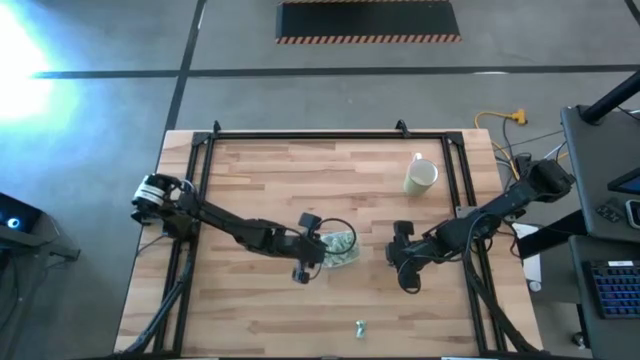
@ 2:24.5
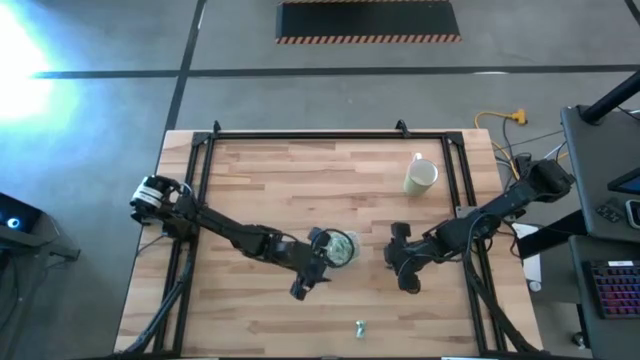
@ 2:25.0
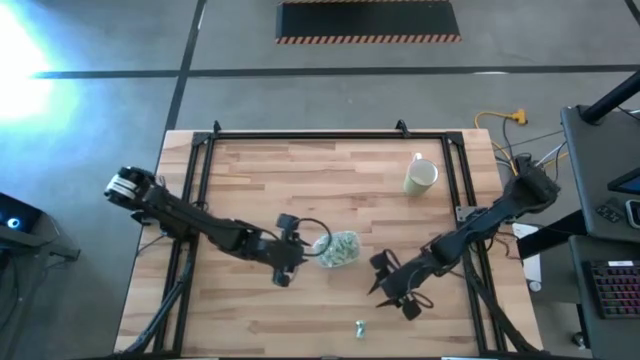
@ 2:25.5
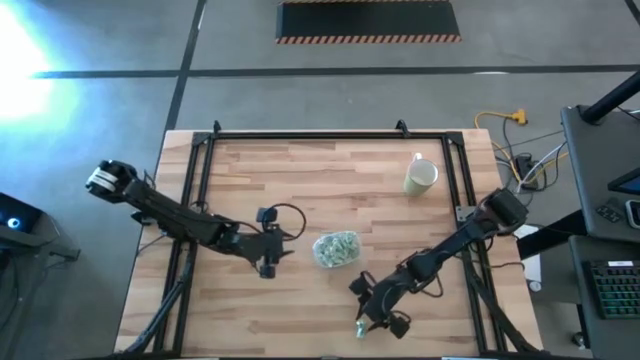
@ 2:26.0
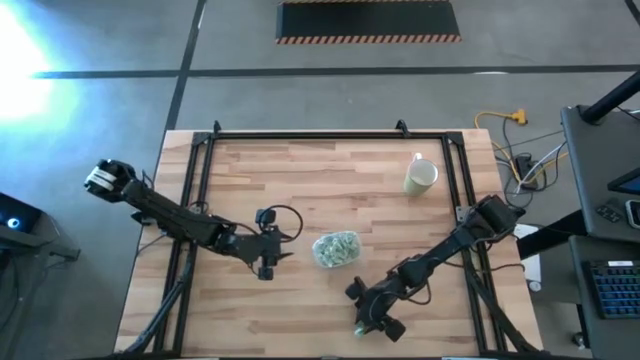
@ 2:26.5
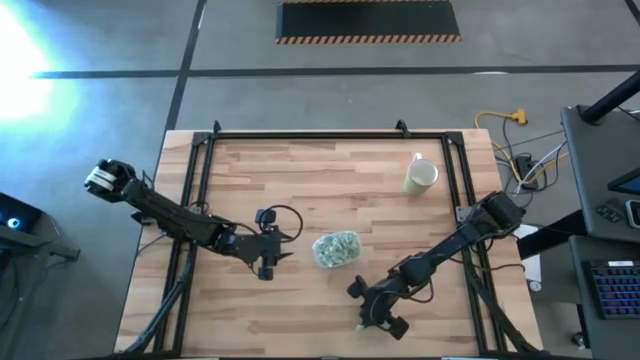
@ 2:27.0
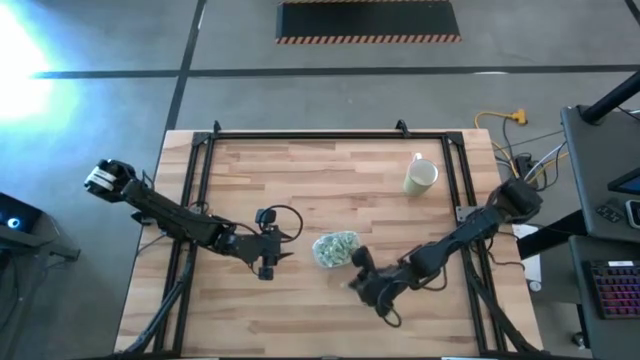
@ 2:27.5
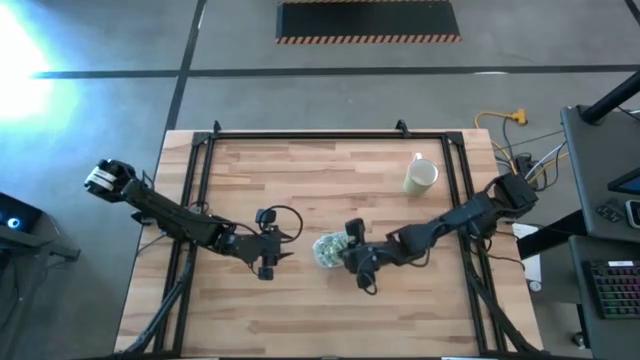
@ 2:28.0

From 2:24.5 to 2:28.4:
Task: Pick and place items into bin
Put the Stevia packet into the transparent bin

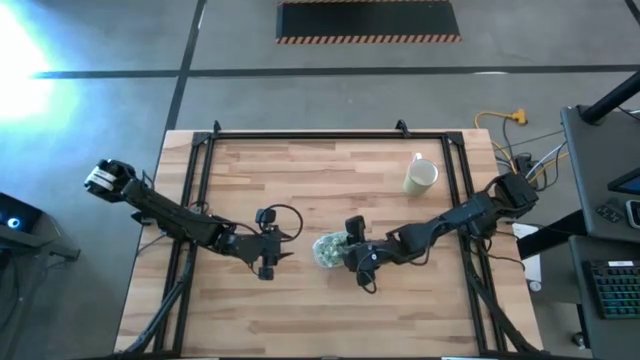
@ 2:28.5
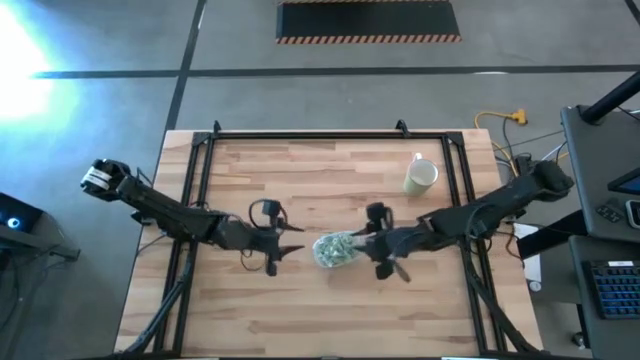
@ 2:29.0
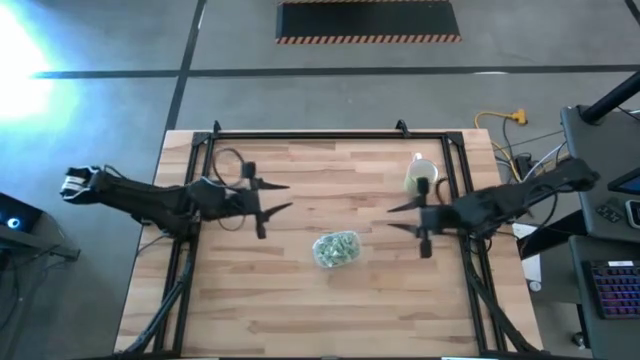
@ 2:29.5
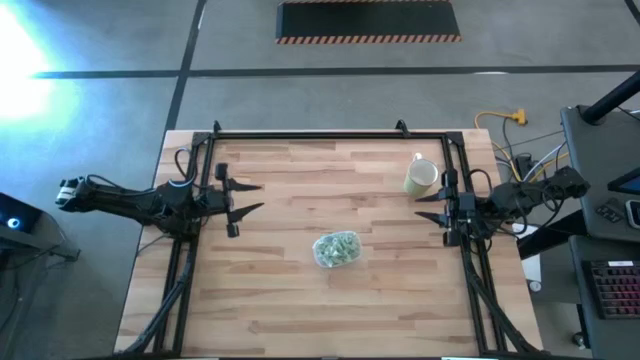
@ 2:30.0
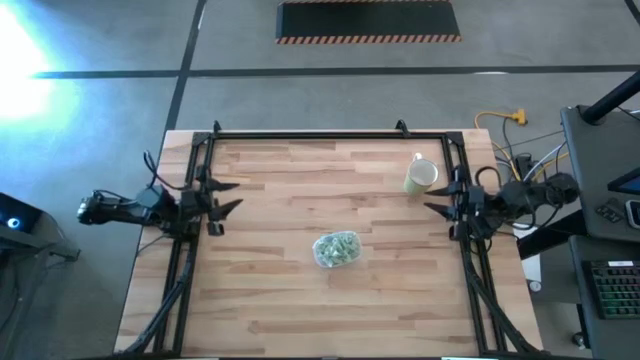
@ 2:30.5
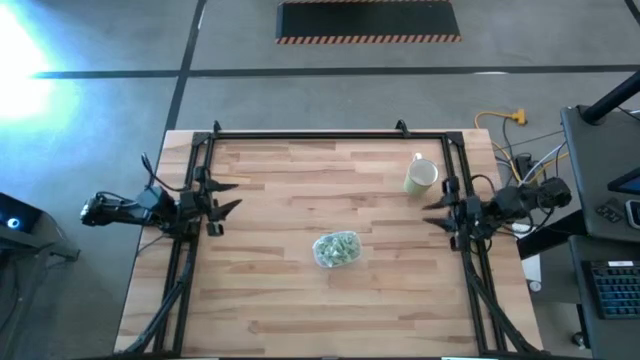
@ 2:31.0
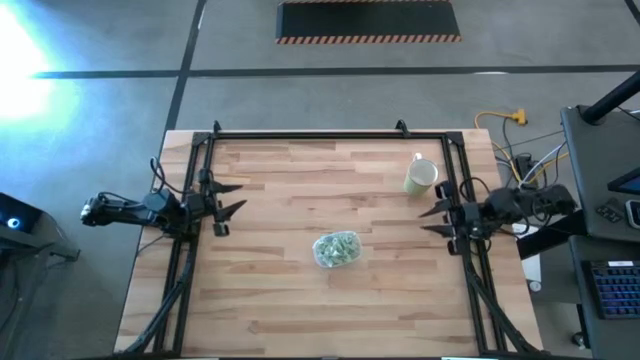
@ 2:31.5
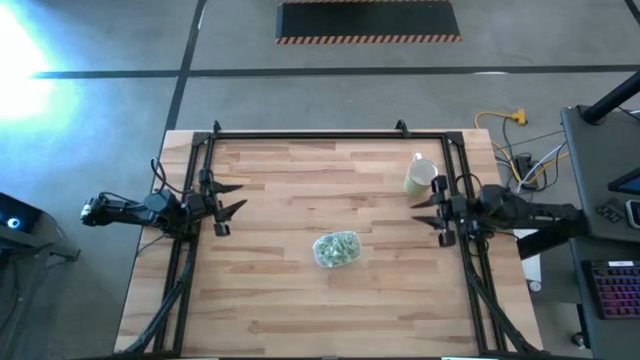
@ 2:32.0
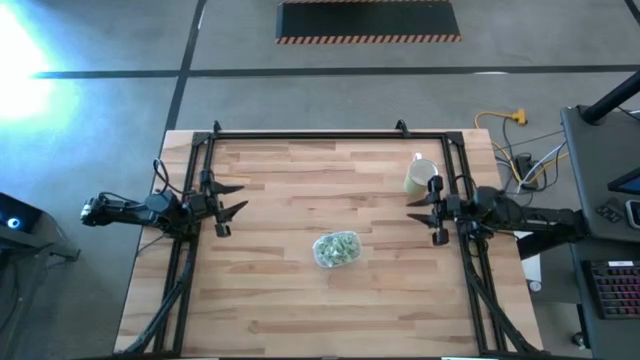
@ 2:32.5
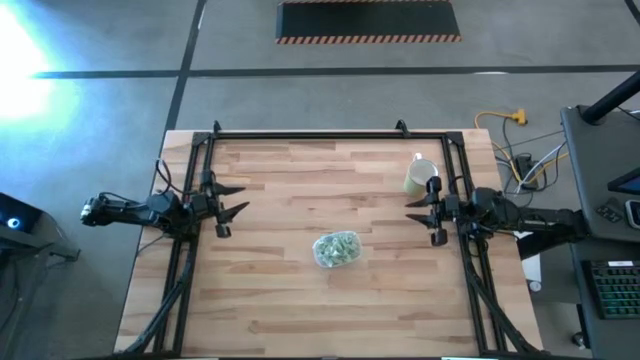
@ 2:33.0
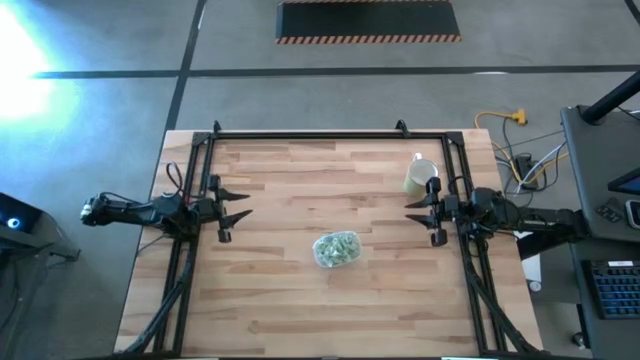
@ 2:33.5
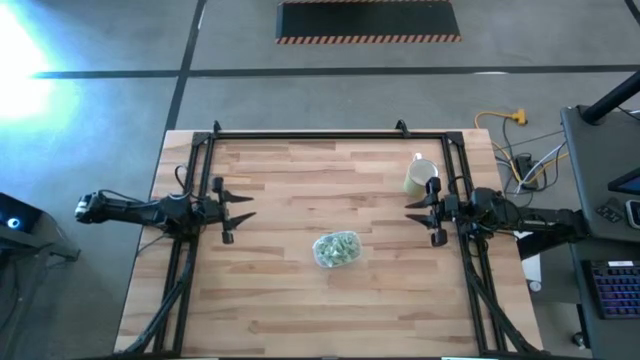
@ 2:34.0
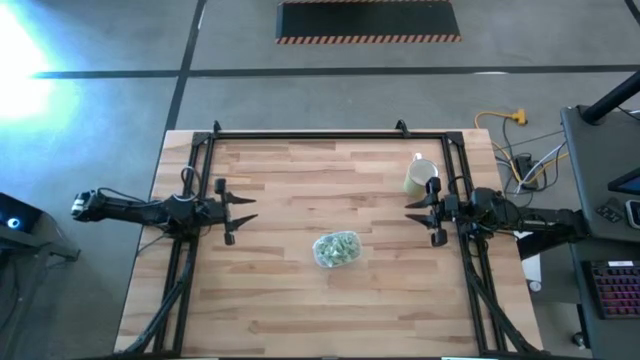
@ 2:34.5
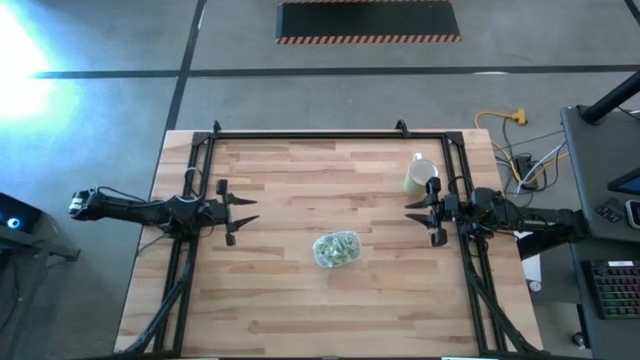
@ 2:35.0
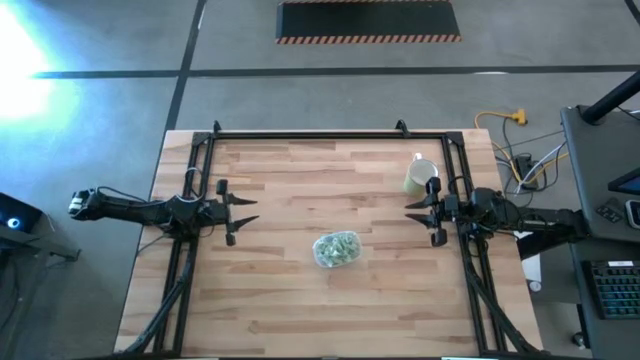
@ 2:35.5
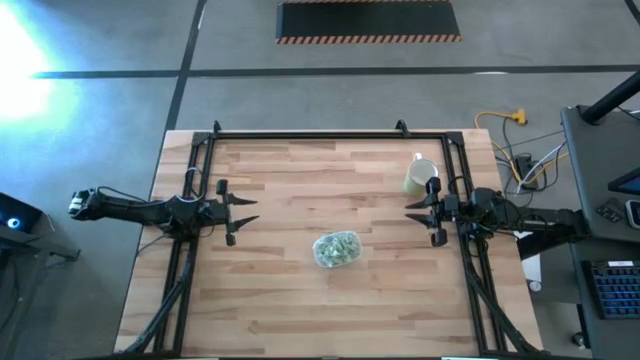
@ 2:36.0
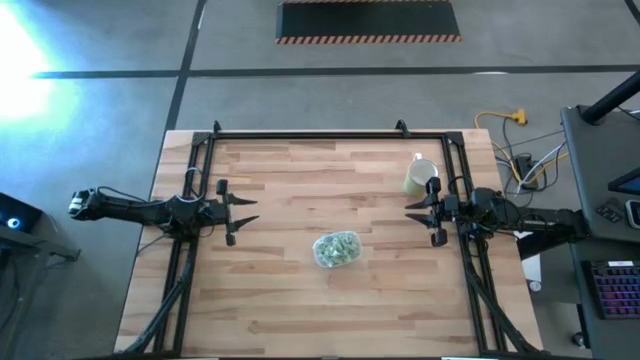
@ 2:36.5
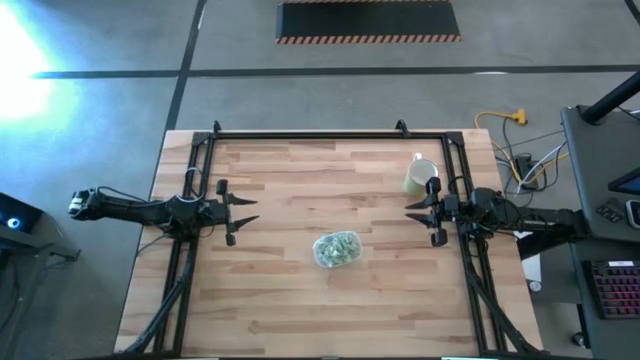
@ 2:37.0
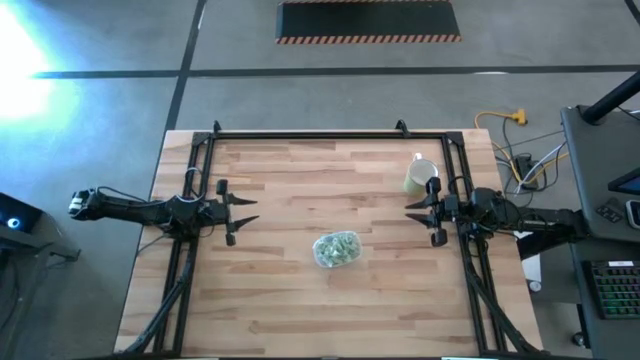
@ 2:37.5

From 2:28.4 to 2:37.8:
Return to Home Position

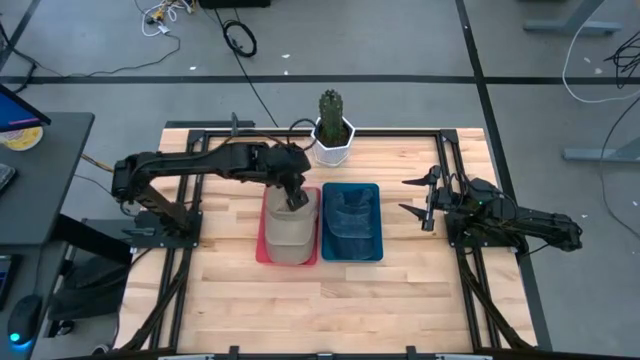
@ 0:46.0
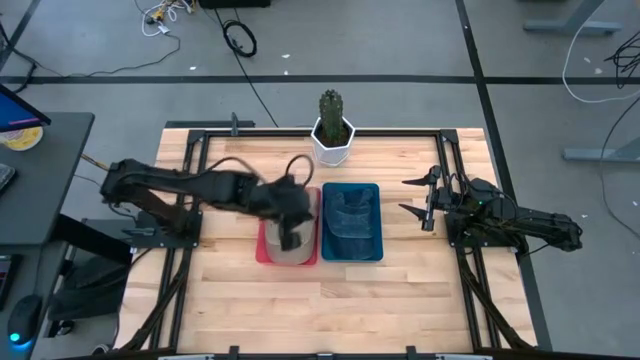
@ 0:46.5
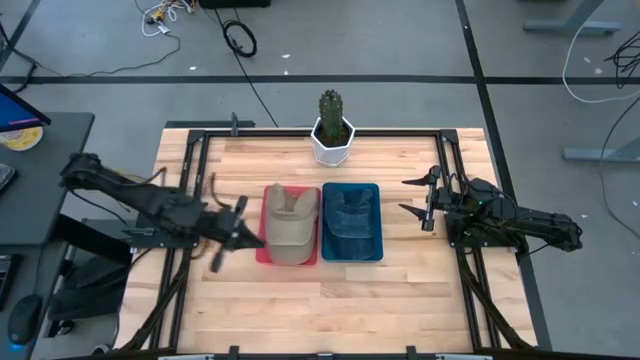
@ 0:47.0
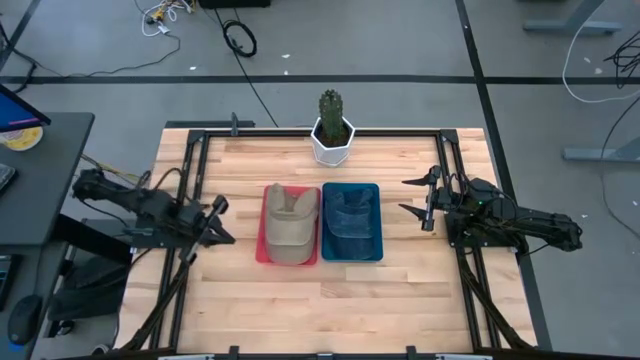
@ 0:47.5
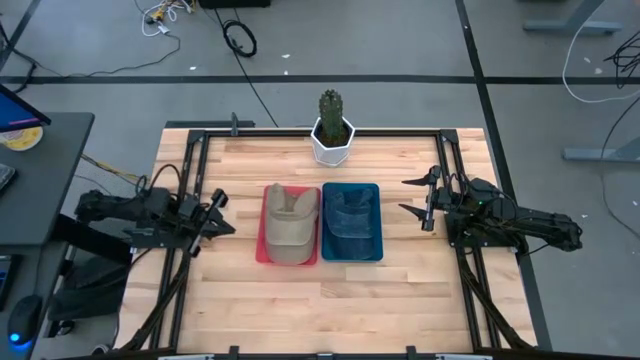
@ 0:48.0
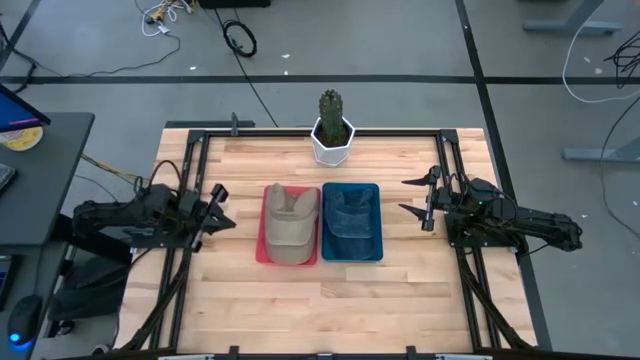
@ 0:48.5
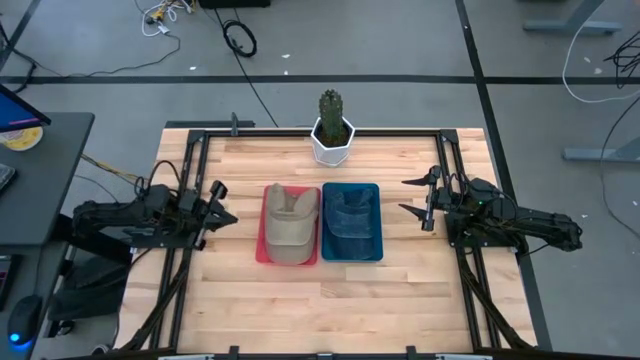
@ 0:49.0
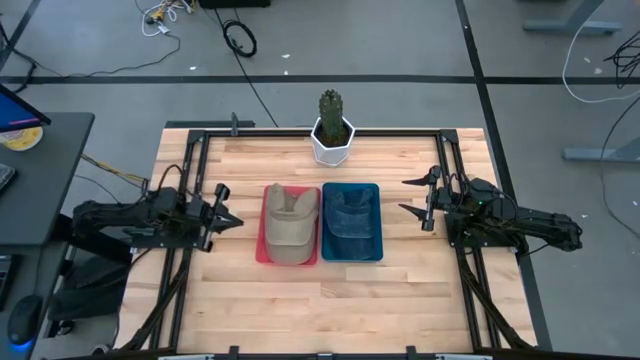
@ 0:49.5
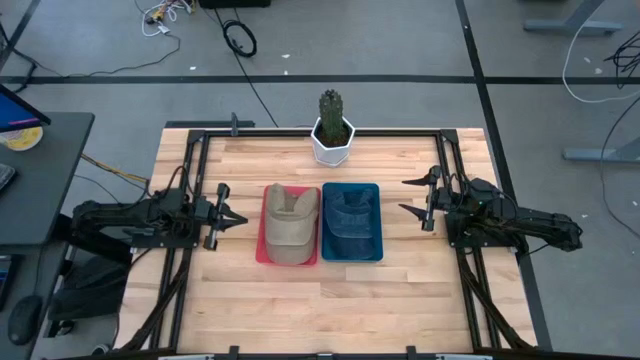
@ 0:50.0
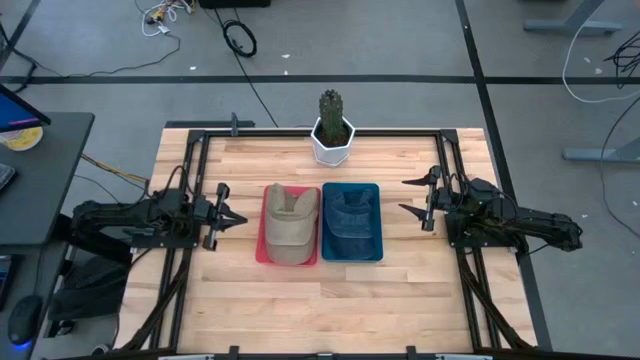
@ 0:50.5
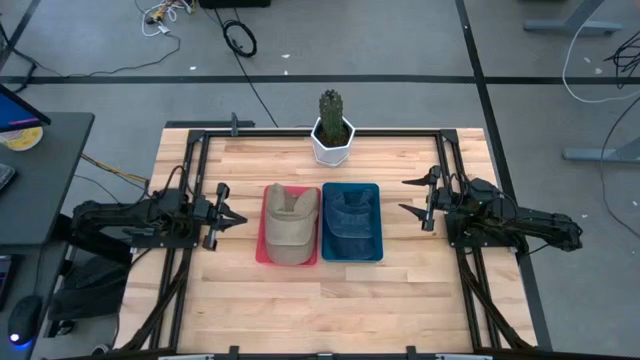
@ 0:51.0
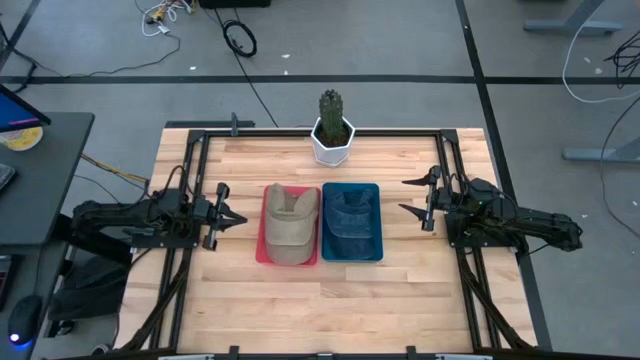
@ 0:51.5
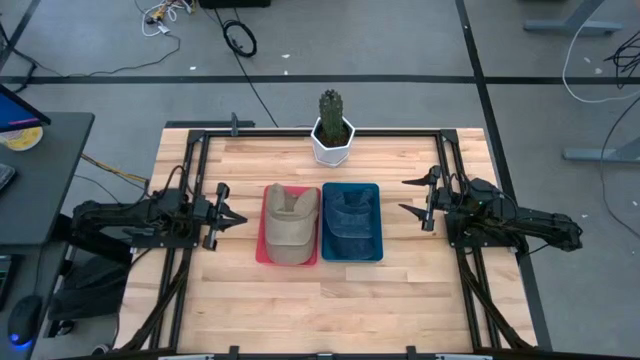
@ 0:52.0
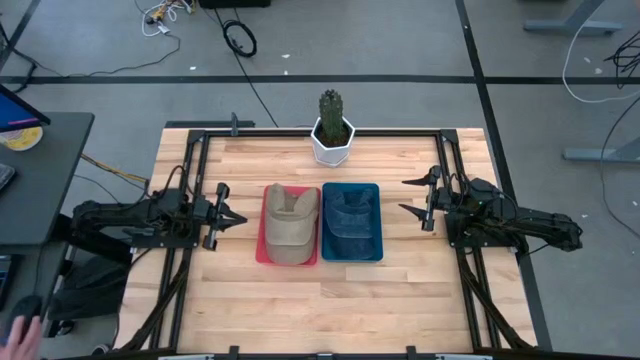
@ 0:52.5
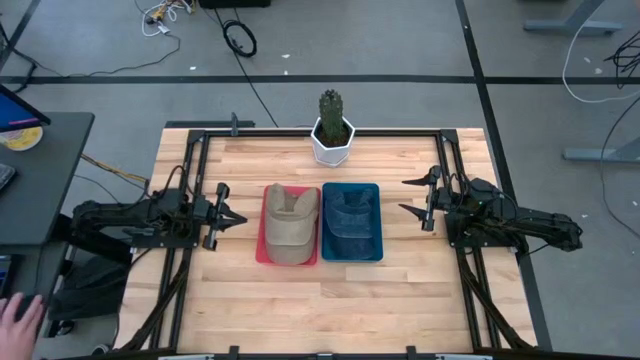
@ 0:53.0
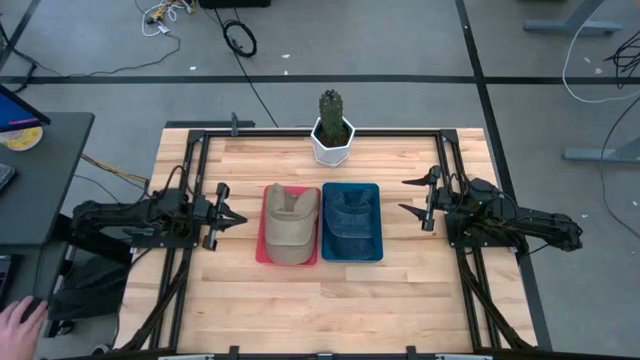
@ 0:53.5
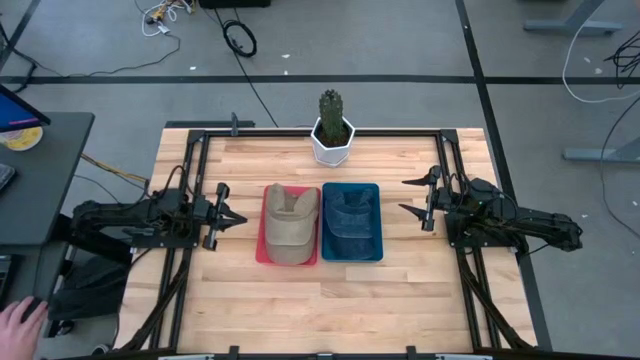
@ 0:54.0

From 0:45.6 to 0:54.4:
Task: Pick & Place hat
Return to Home Position
